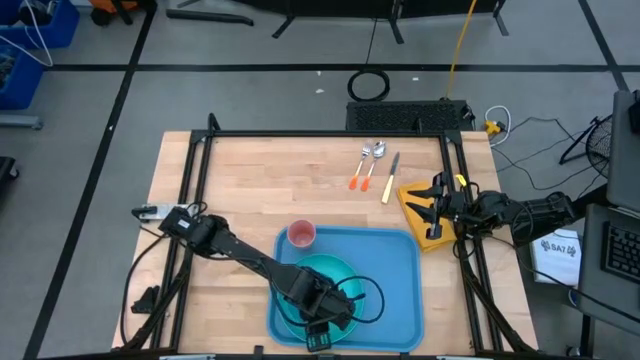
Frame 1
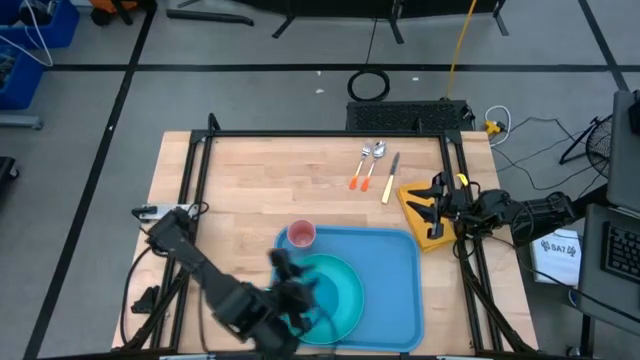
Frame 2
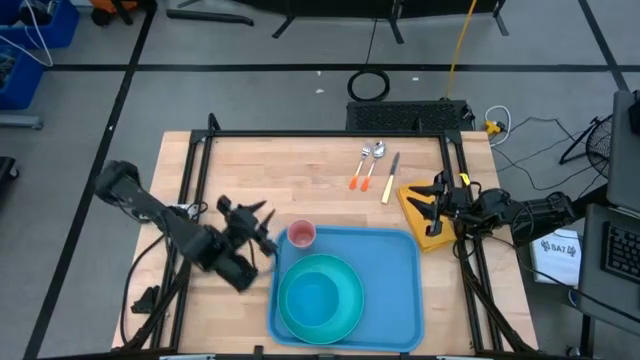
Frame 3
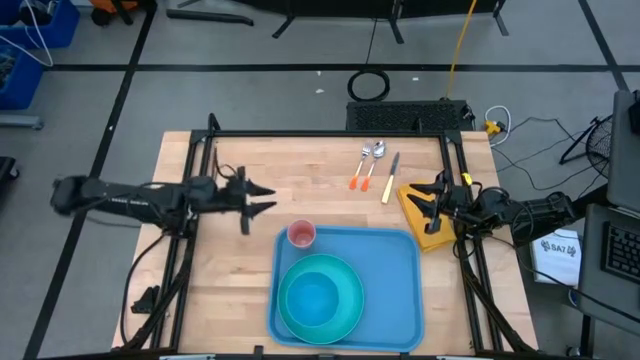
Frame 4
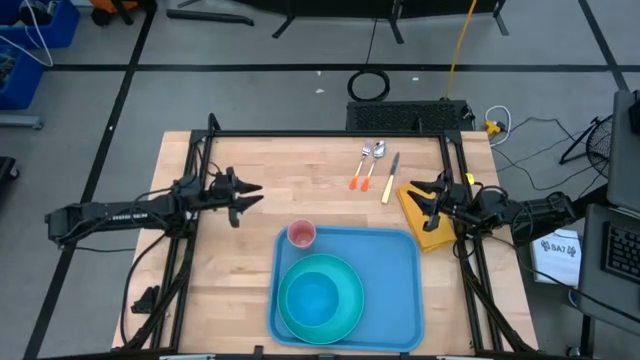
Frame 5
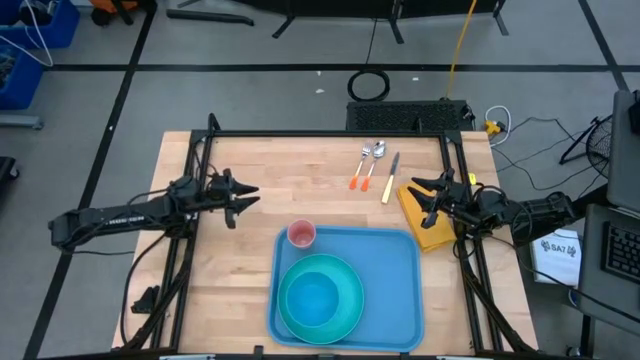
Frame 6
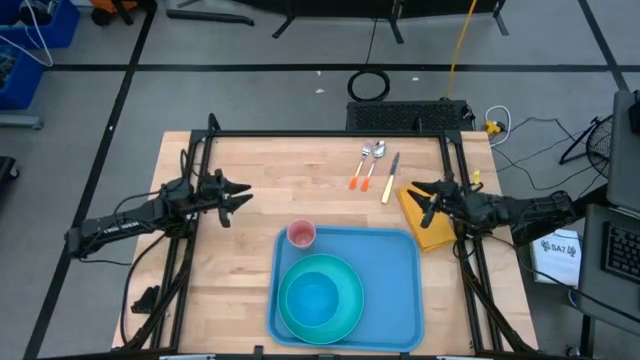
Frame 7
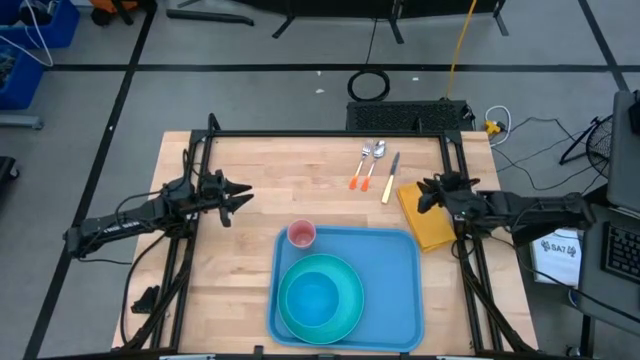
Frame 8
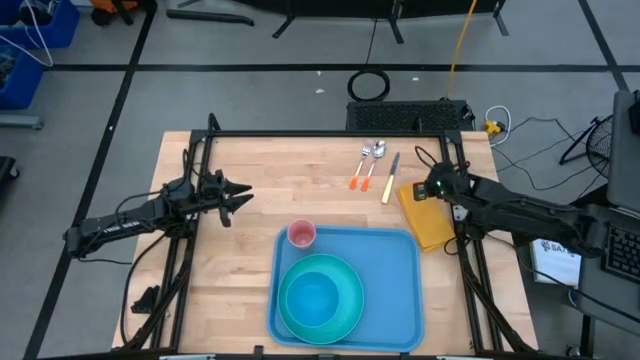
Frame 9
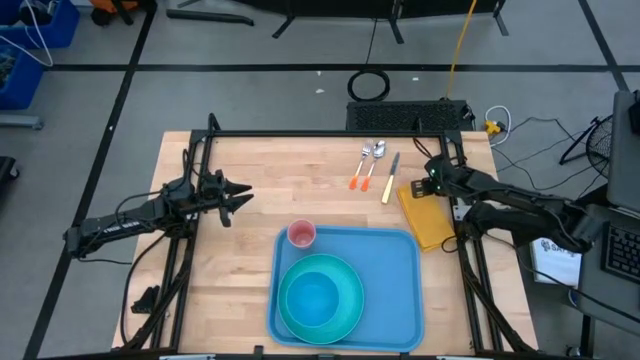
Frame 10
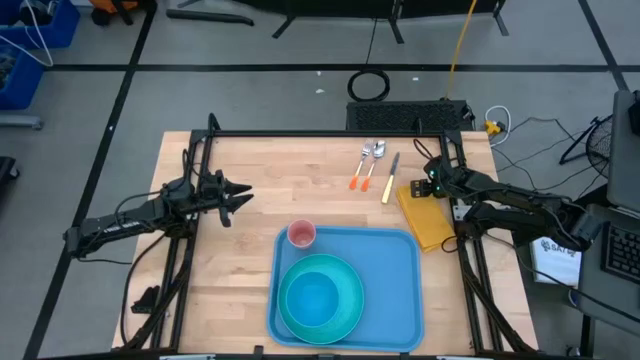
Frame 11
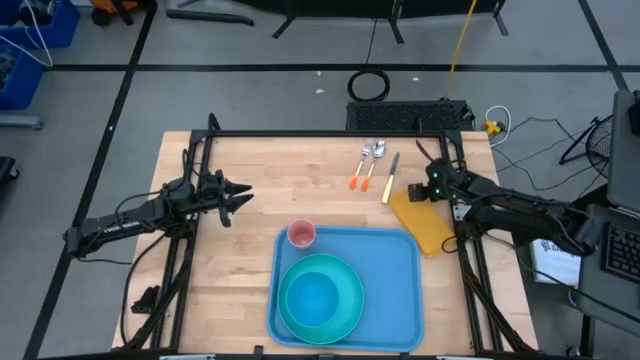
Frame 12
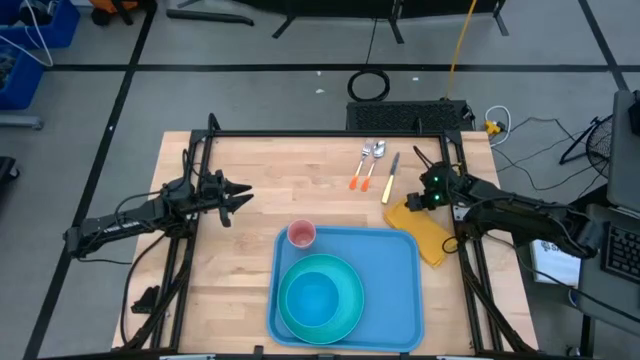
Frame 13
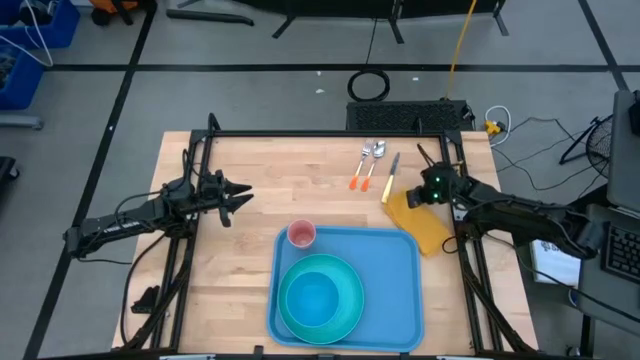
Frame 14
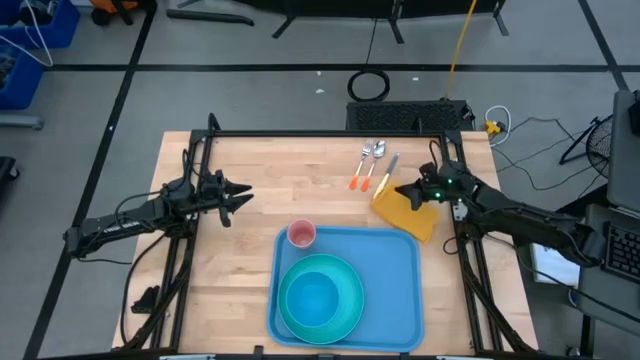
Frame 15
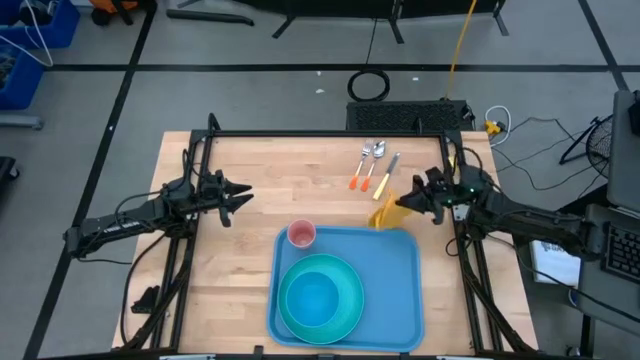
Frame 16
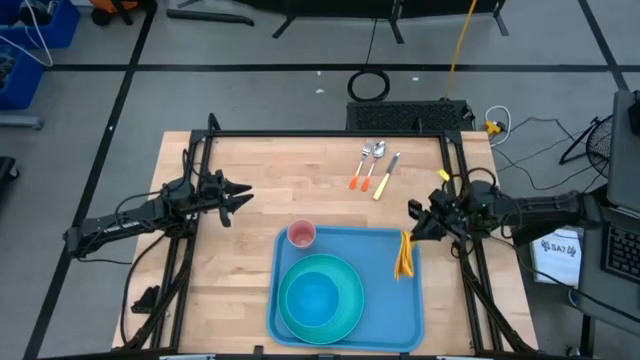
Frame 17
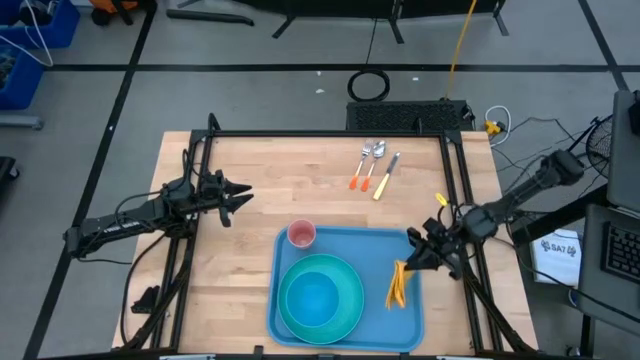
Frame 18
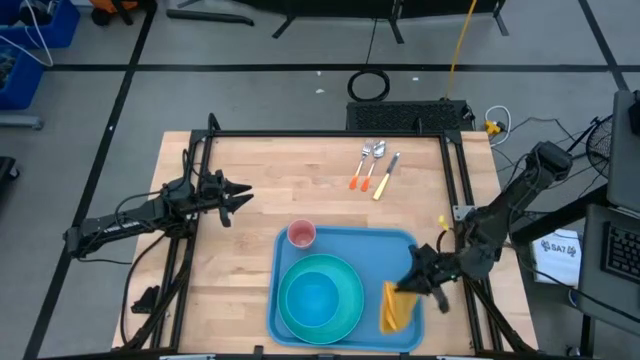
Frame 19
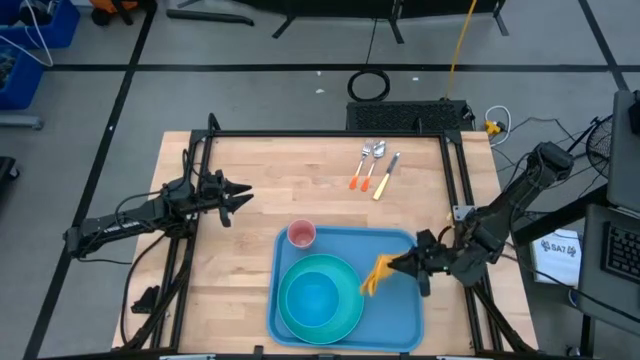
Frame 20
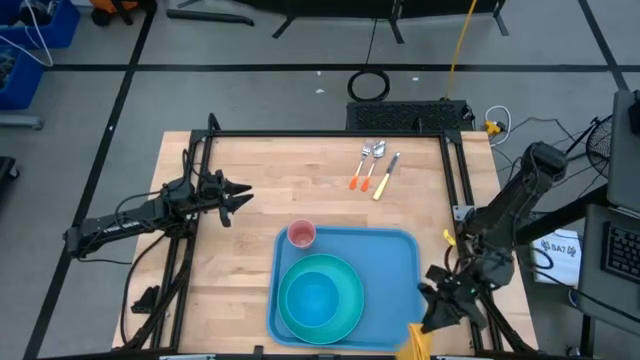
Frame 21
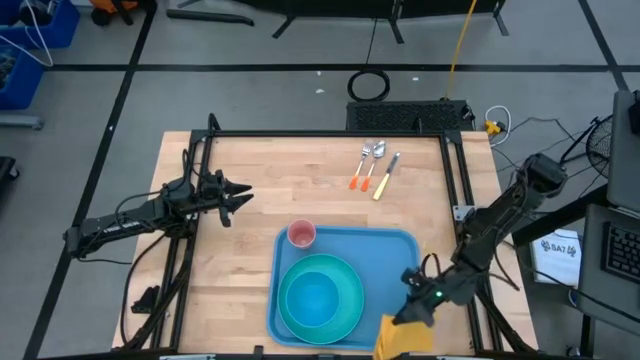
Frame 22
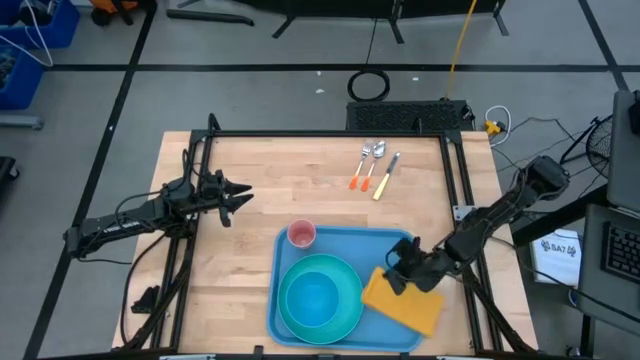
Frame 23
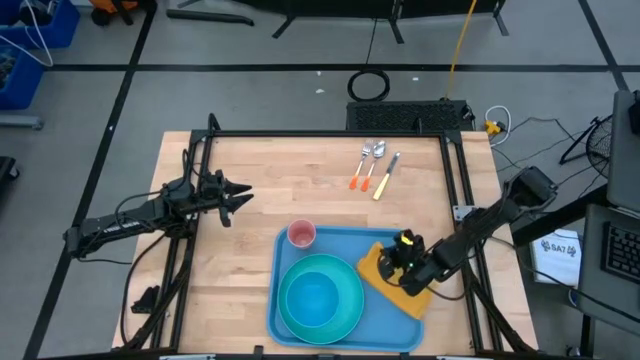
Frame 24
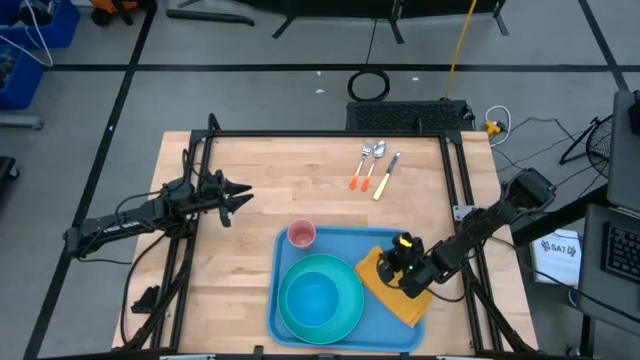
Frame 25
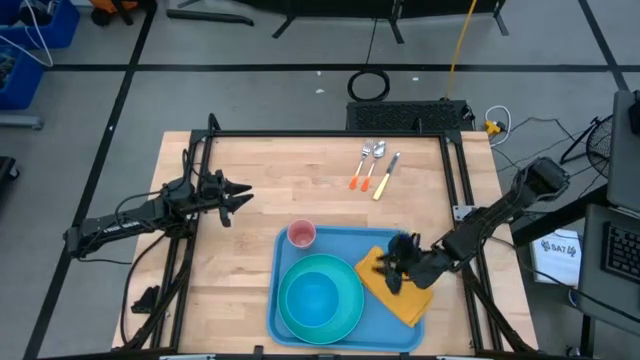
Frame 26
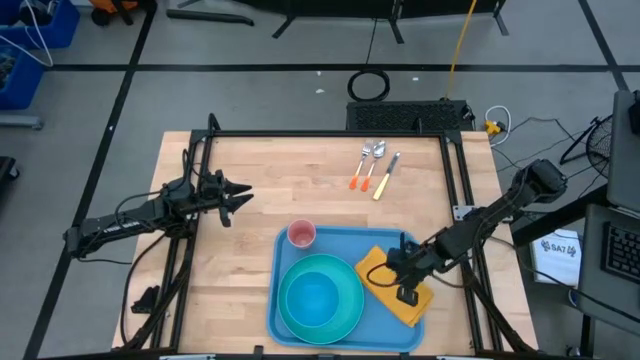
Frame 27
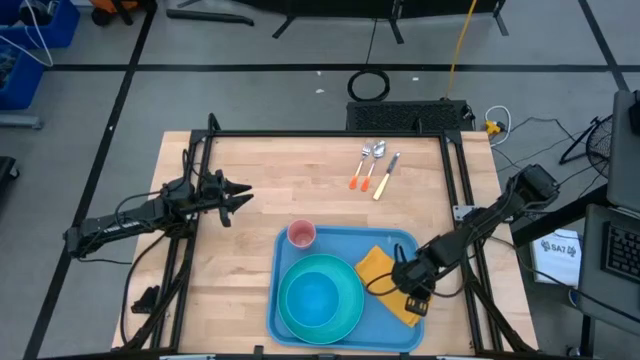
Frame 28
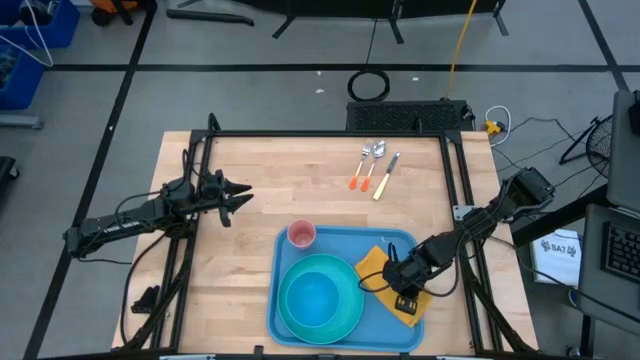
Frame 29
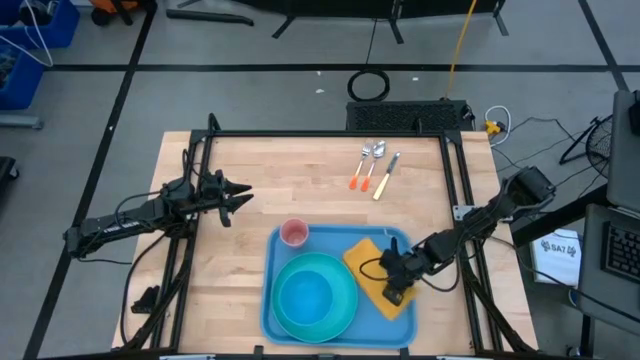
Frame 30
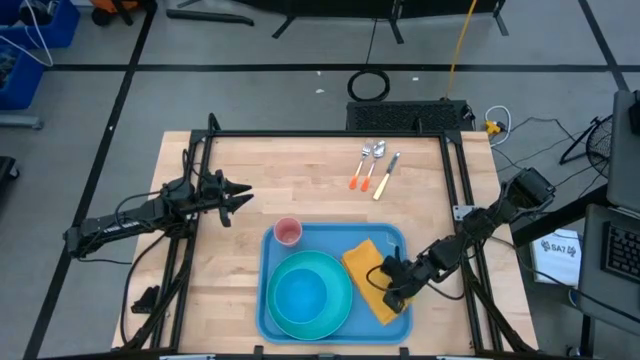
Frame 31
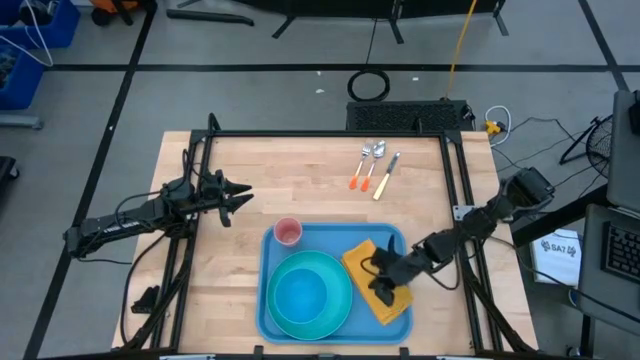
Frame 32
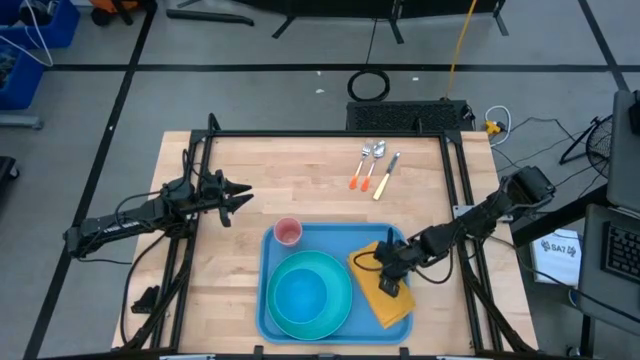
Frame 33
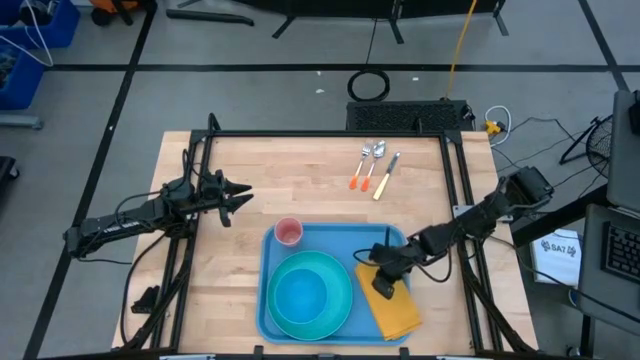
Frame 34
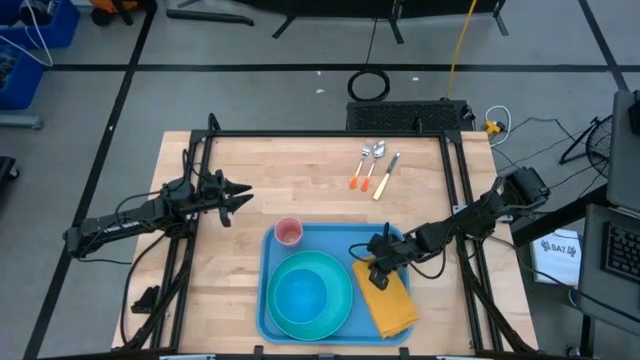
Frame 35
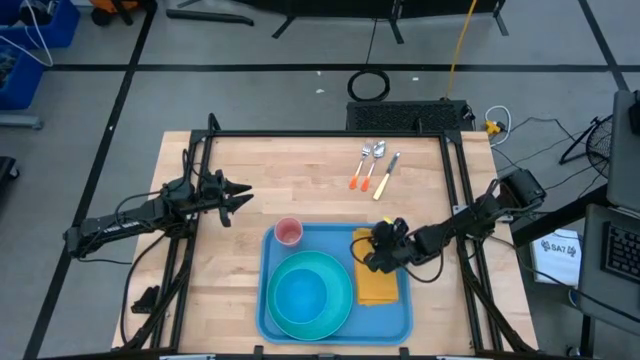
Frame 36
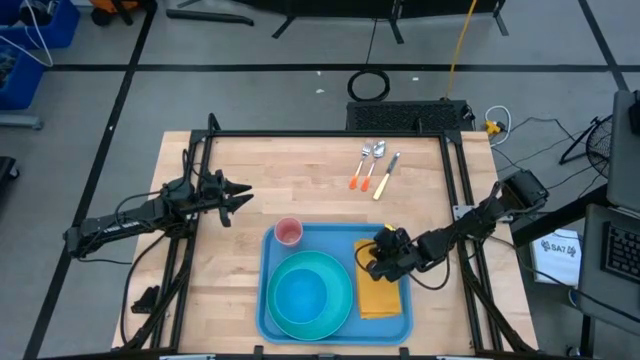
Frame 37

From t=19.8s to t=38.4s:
Task: Set up tray
Put the yellow napkin on the blue tray

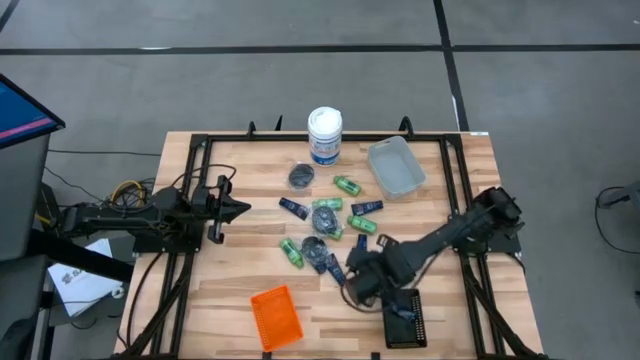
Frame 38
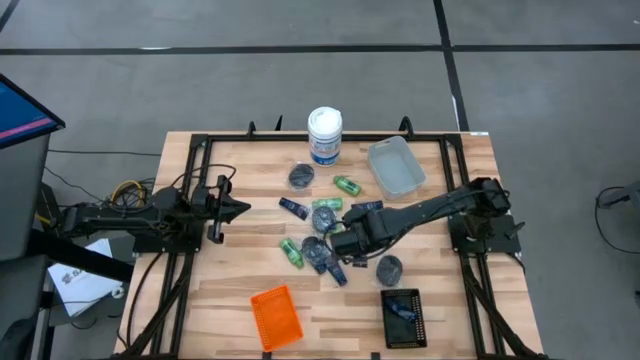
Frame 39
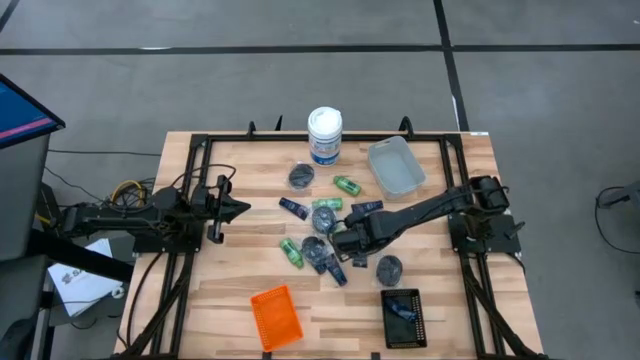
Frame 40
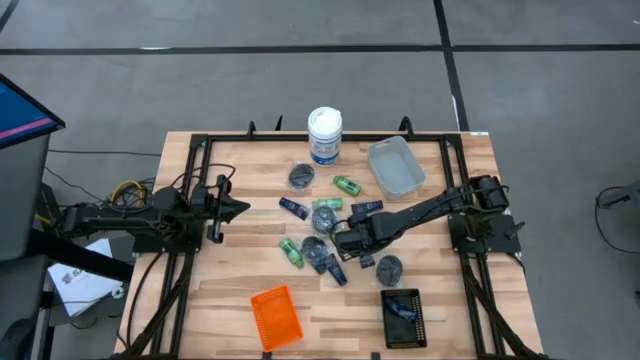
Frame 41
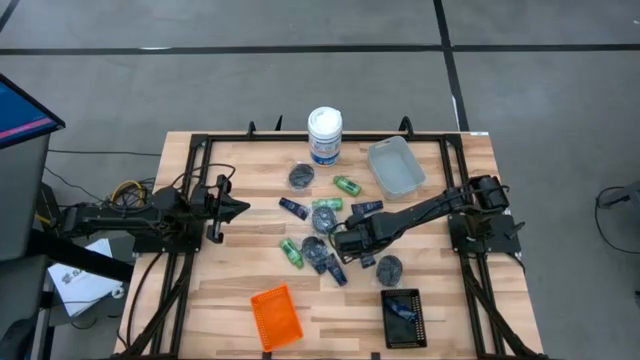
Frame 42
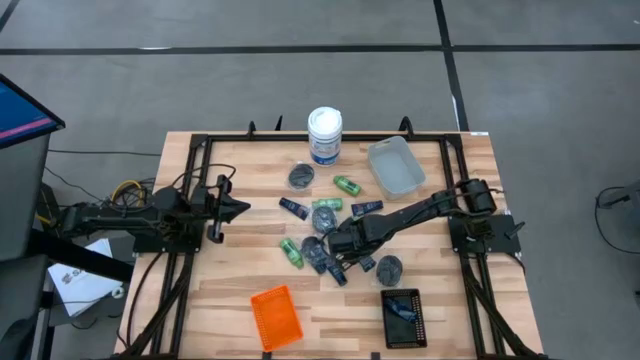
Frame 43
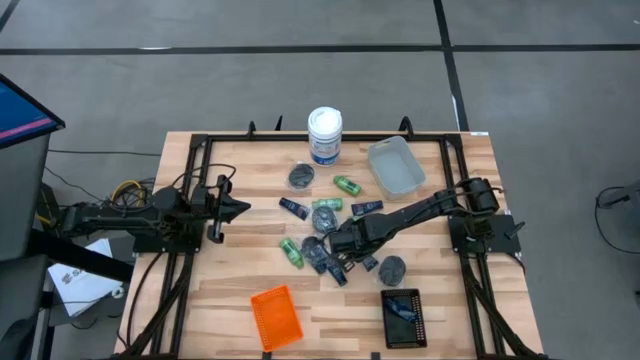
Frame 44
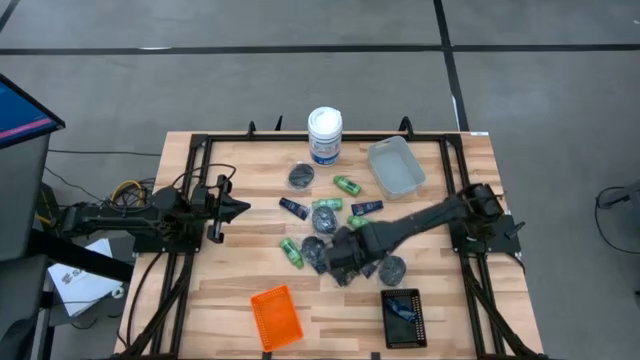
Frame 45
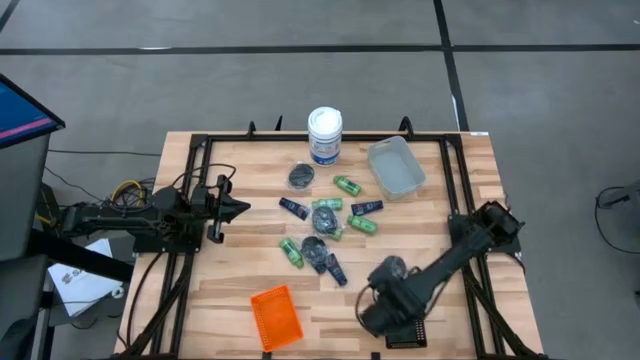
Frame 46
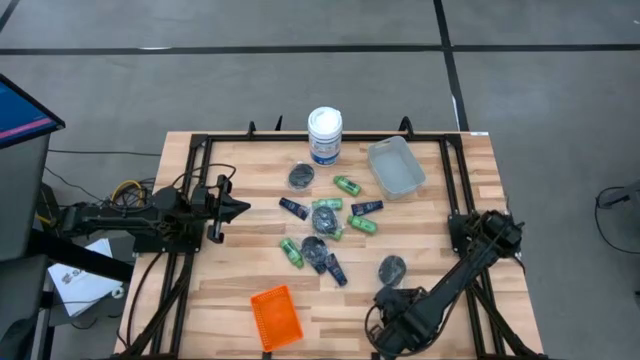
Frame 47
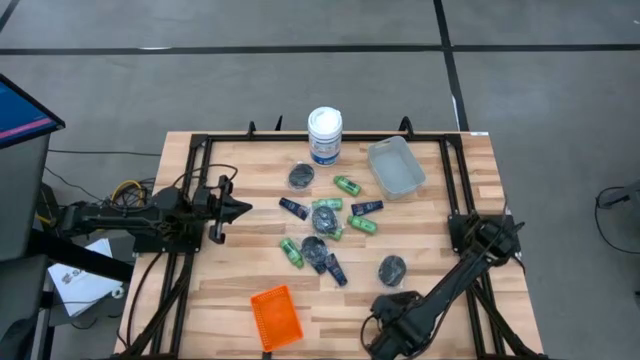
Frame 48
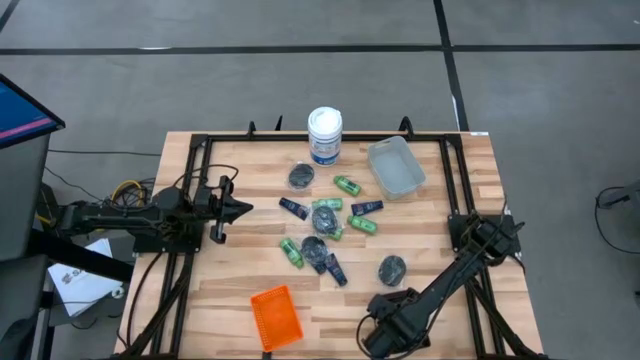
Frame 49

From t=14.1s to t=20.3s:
Task: Pick & Place Travel size toiletries
Put the blue shave cream into the black basket
